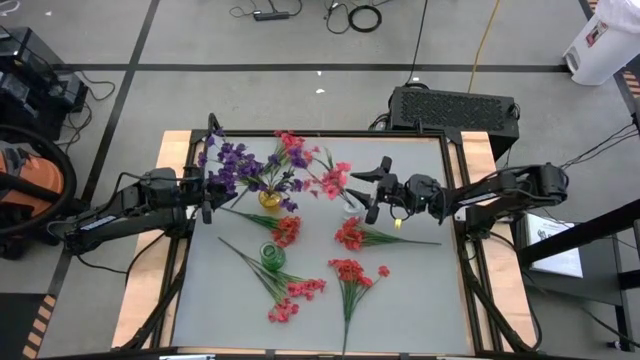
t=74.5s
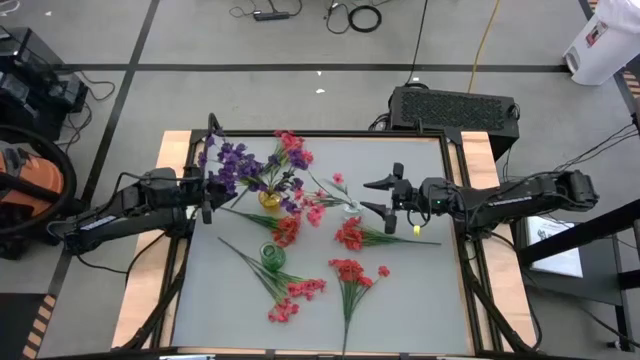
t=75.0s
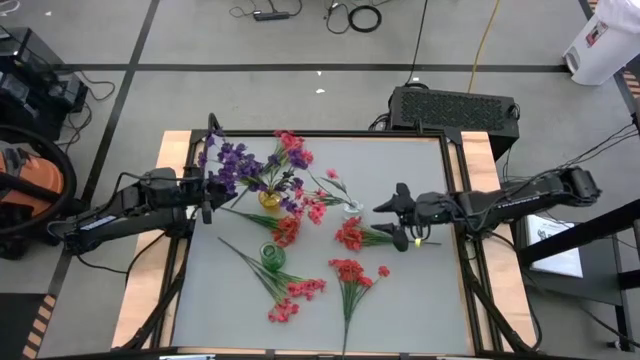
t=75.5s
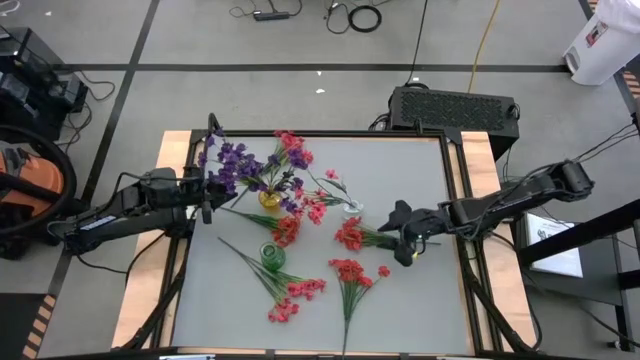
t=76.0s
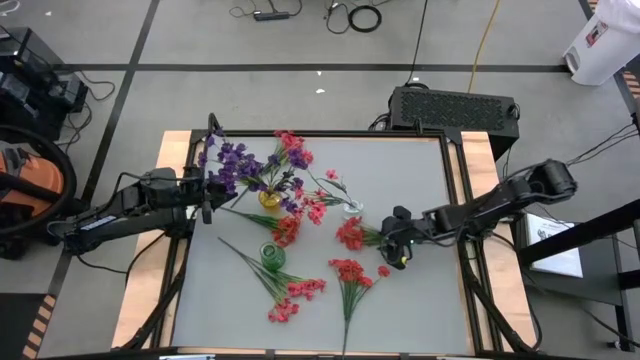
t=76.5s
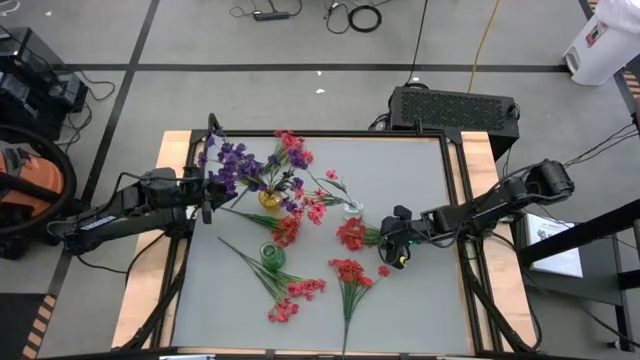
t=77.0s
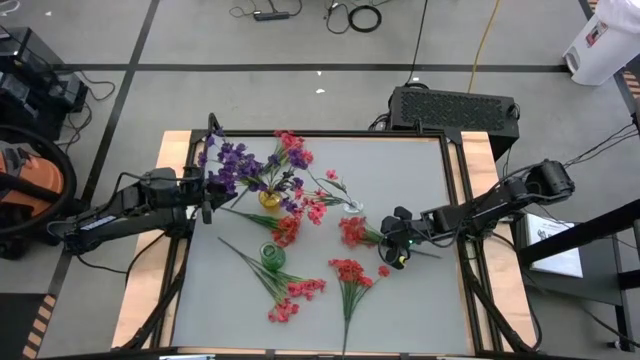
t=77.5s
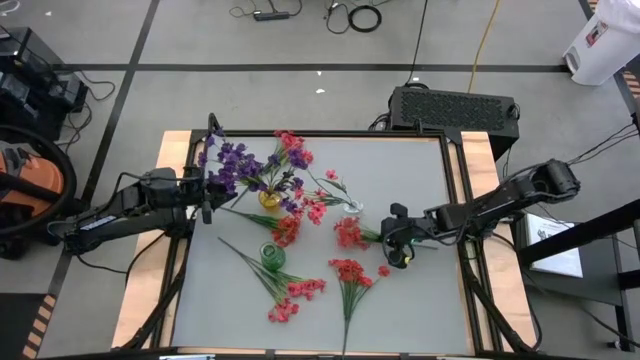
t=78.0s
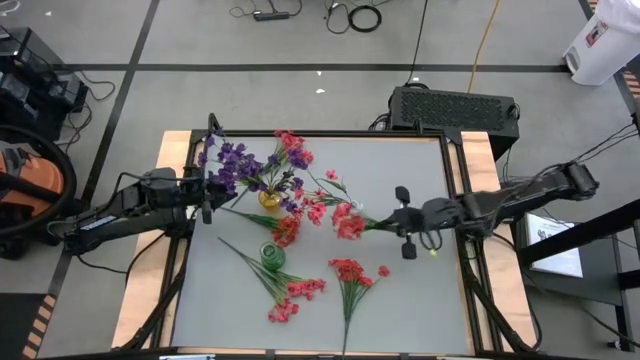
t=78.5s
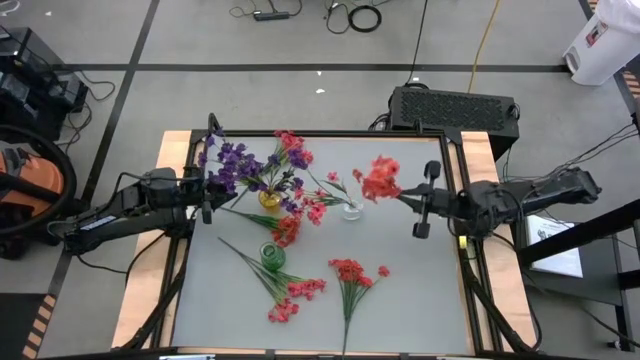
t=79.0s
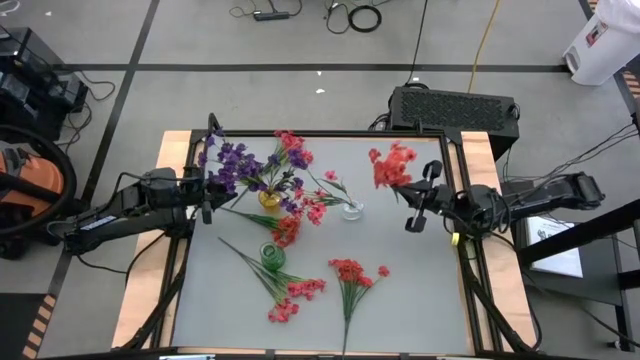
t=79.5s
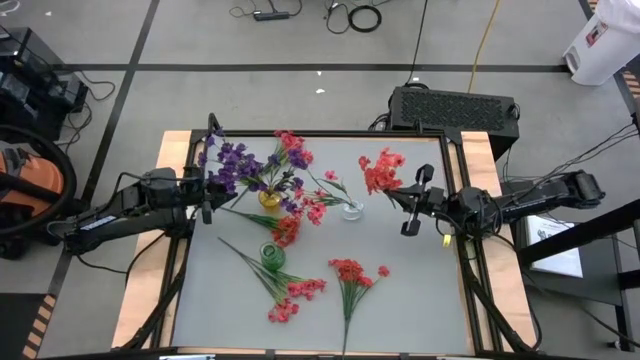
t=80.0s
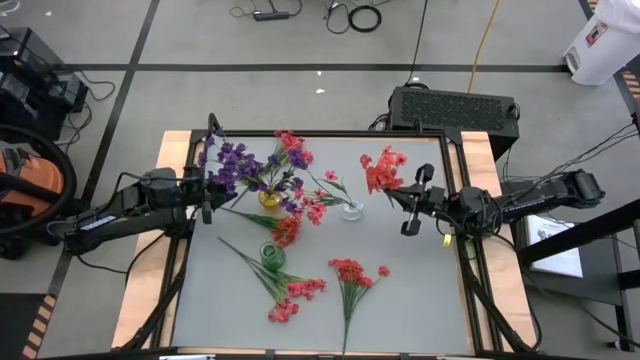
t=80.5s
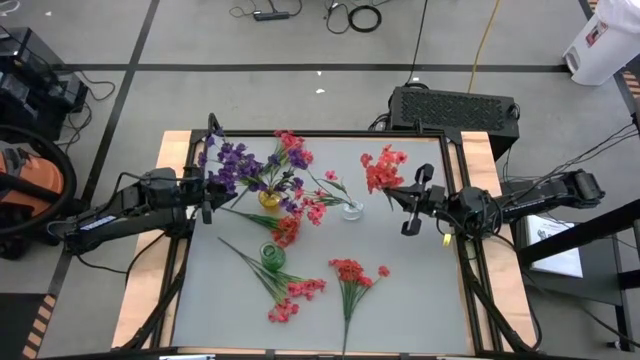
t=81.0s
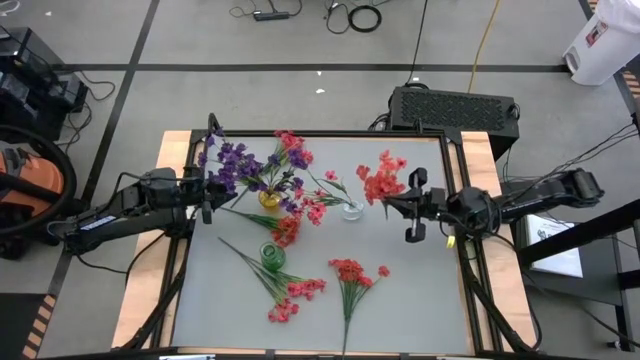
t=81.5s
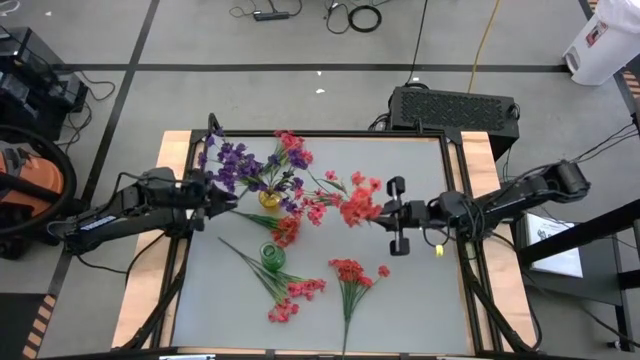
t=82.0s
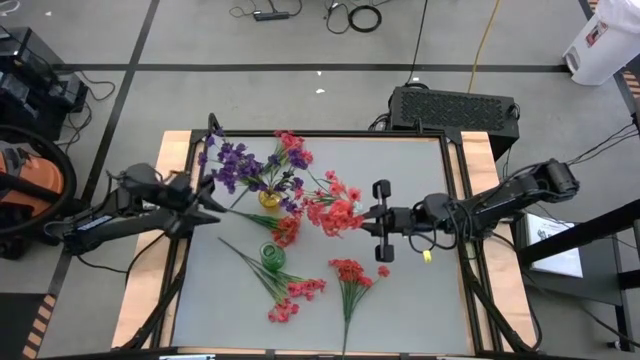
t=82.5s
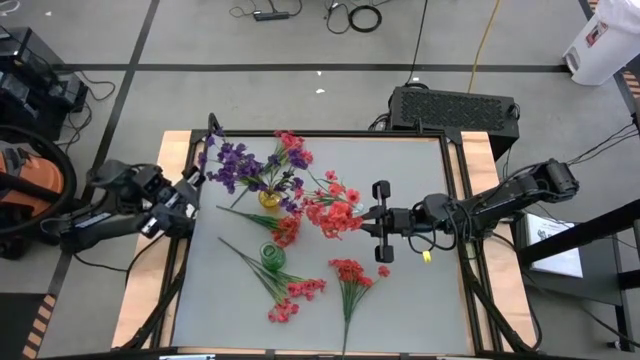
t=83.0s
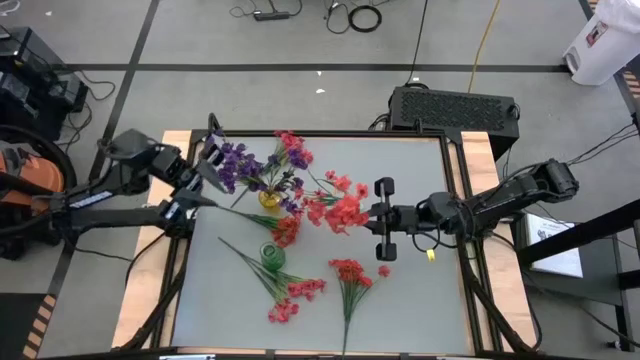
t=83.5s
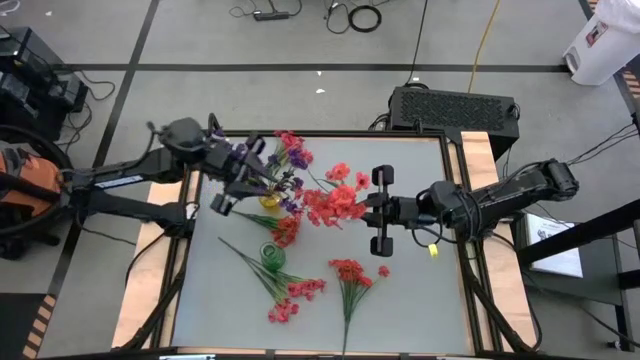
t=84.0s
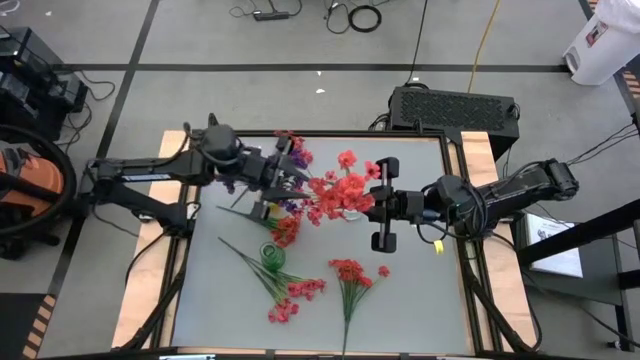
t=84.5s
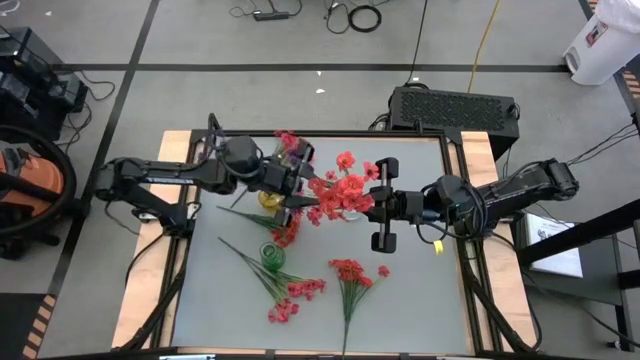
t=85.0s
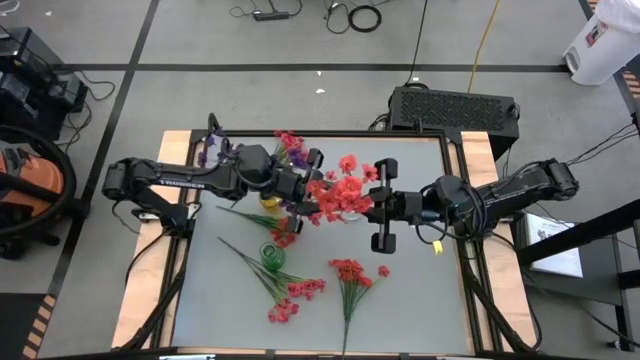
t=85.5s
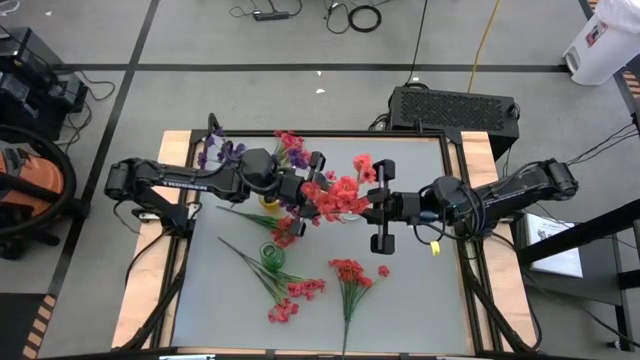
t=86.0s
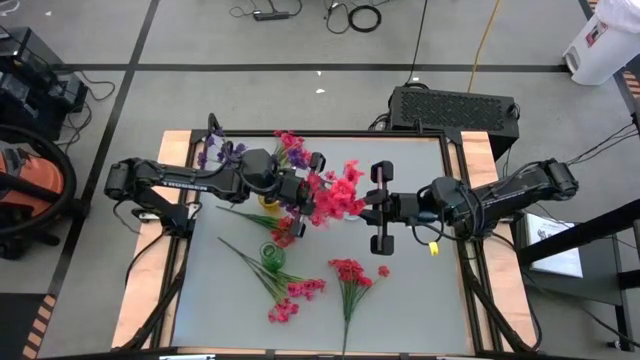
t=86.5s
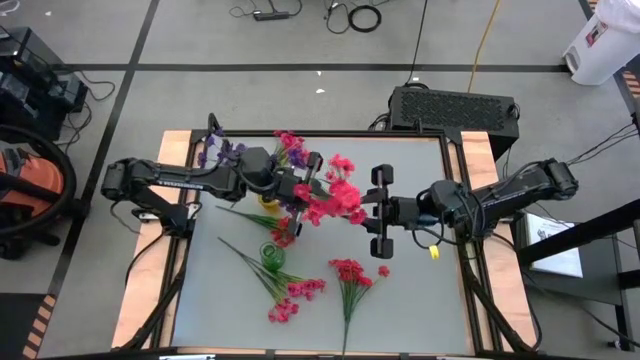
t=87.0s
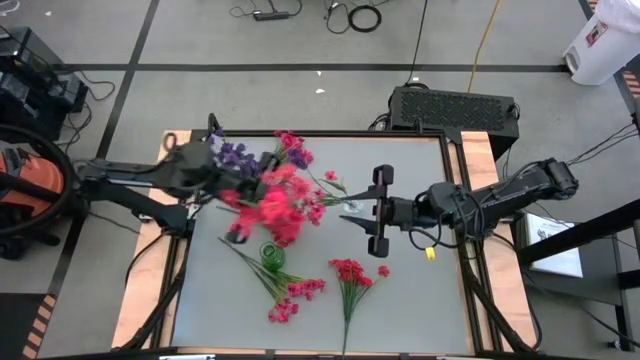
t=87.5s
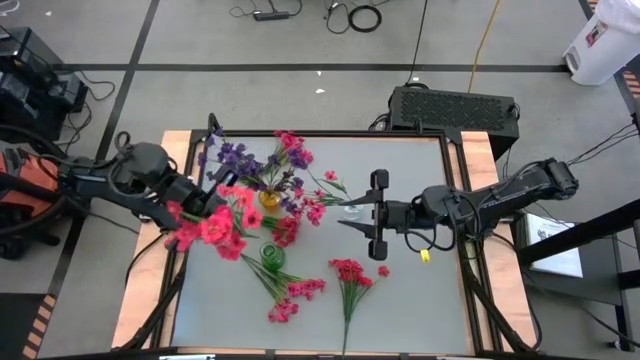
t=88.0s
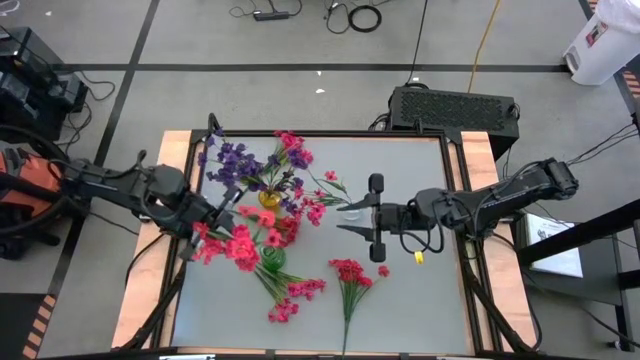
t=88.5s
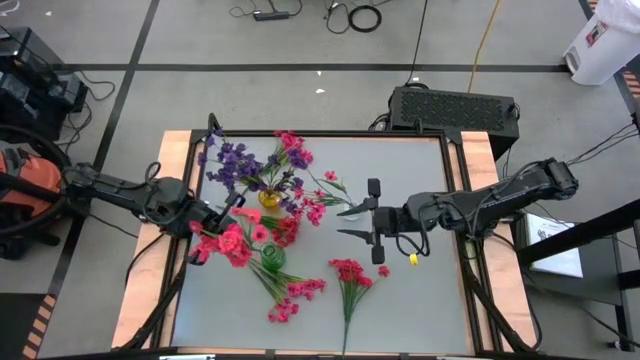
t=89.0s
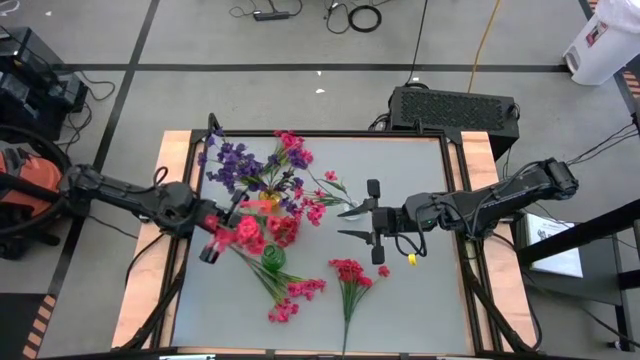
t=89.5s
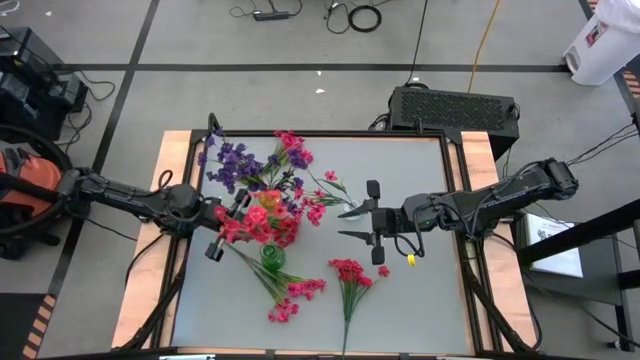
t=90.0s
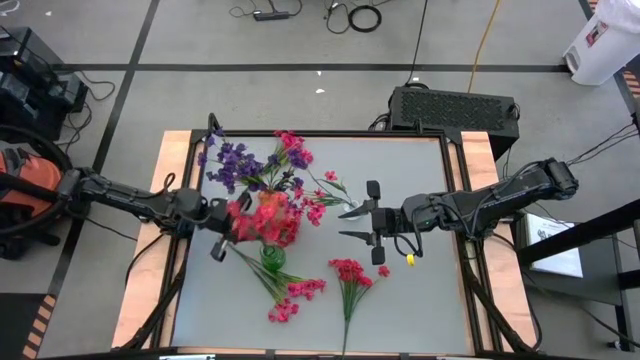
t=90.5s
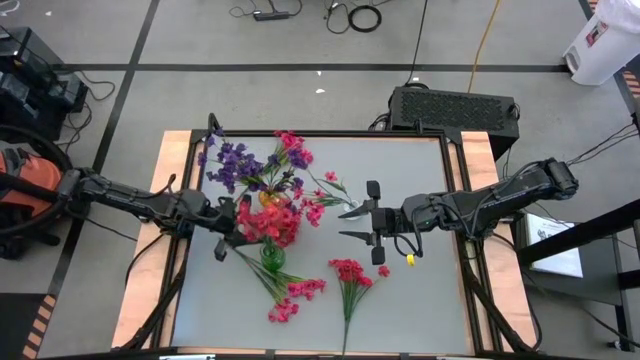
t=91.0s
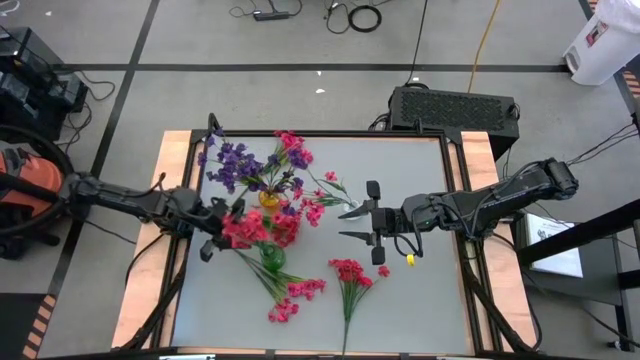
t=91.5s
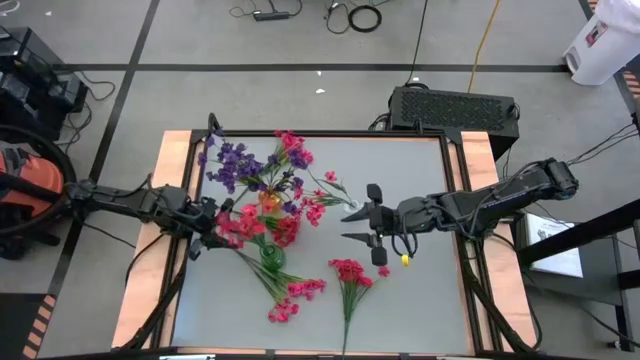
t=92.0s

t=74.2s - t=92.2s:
Task: Sort flowers into vase by color
Put the top right orange flowers into the green vase

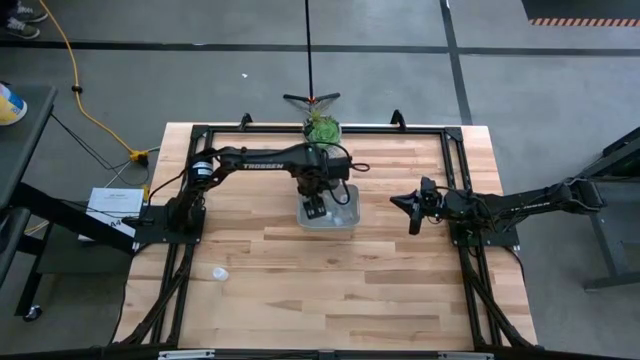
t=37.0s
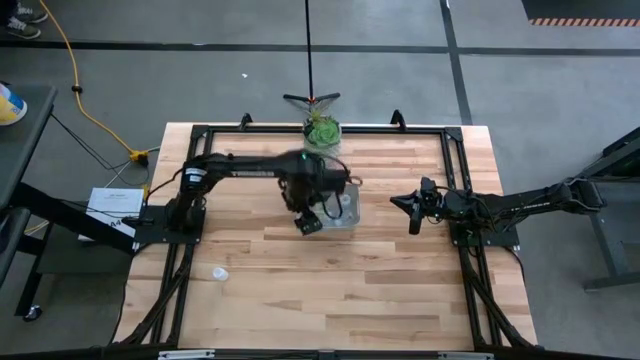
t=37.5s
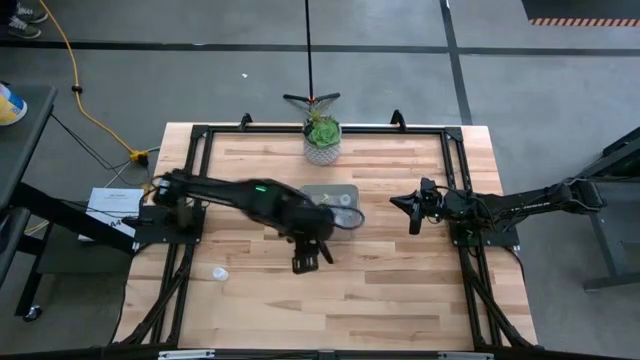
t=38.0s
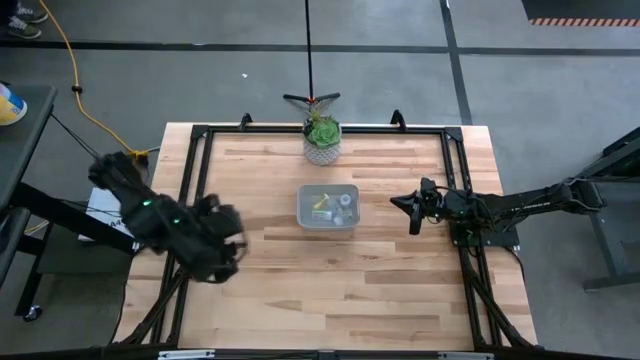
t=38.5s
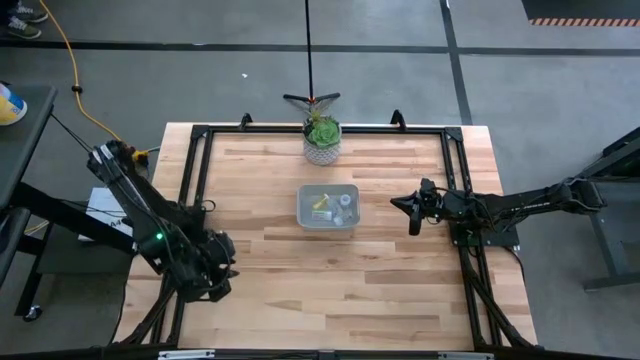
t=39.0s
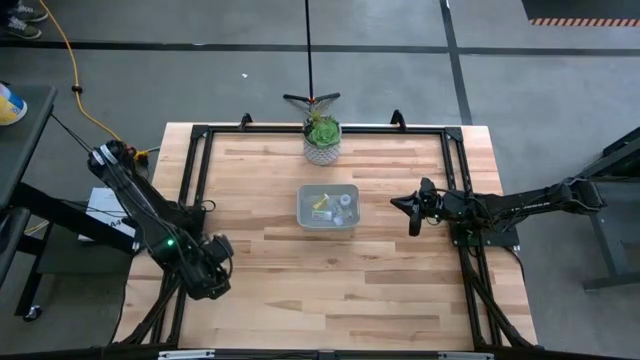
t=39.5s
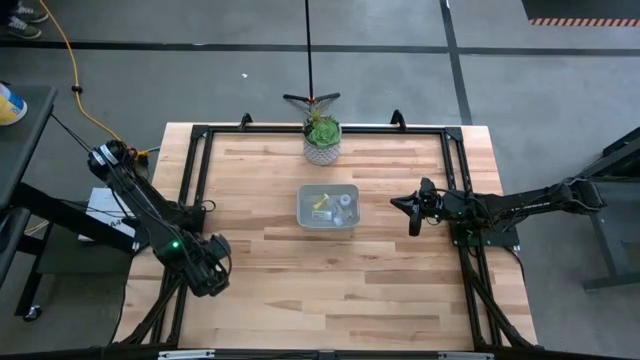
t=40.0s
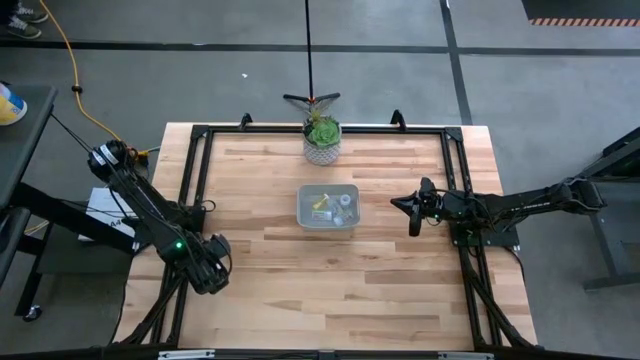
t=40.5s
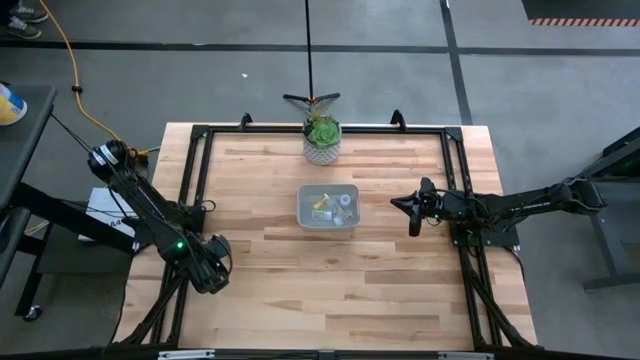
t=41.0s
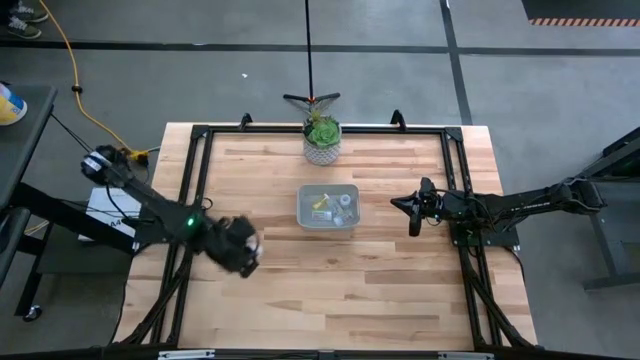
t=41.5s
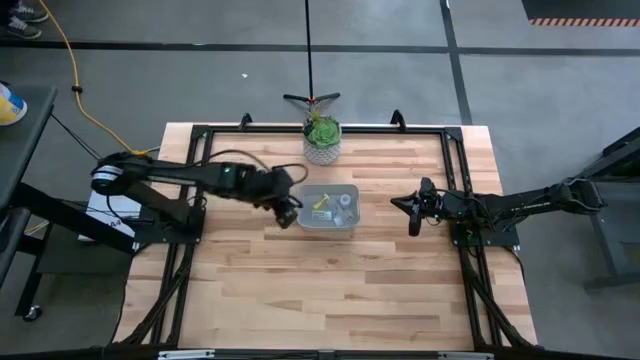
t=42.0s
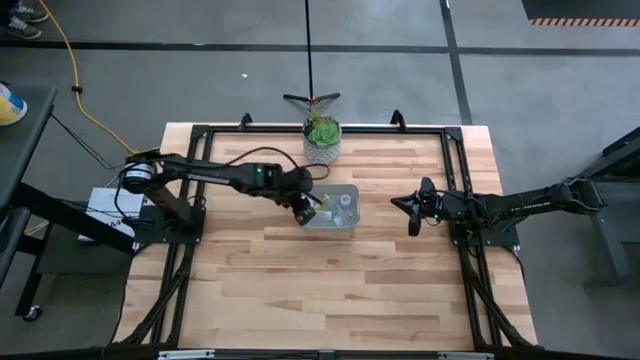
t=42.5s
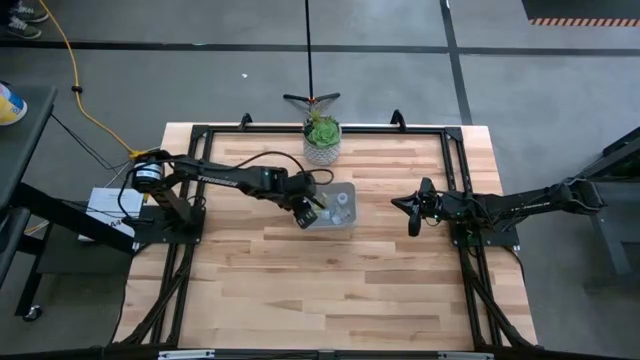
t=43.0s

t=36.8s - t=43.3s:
Task: Pick and place pill bottles into a basket
Put the white pill bottle into the gray bin
